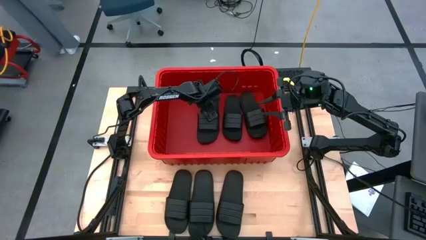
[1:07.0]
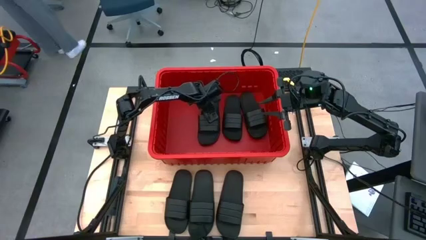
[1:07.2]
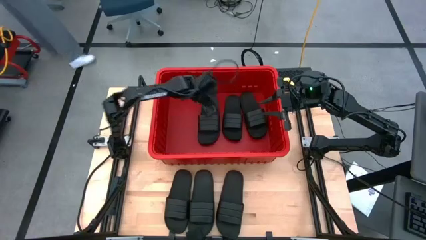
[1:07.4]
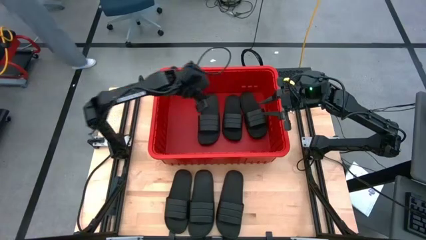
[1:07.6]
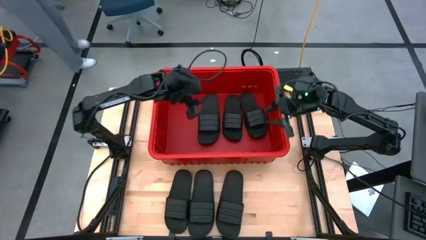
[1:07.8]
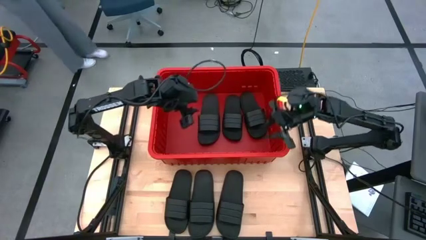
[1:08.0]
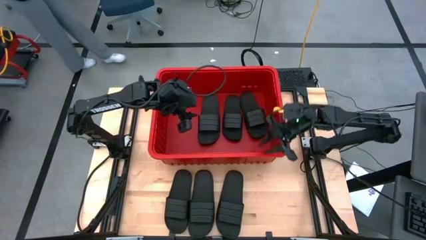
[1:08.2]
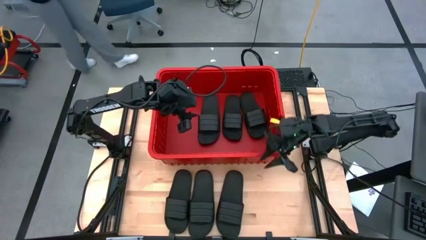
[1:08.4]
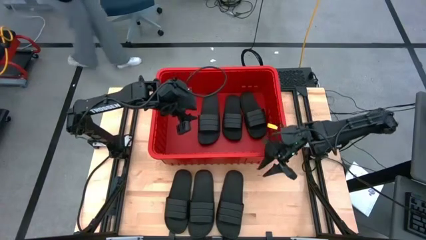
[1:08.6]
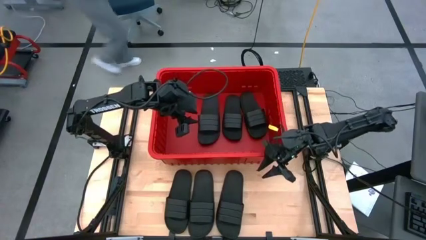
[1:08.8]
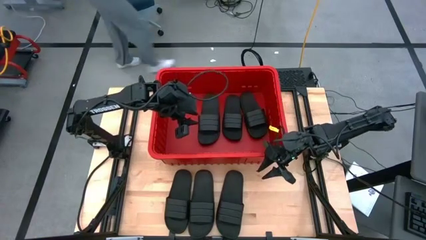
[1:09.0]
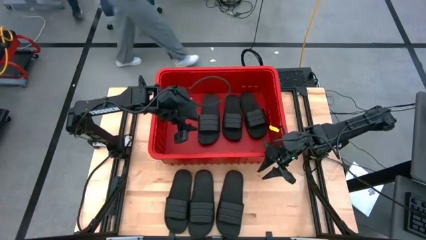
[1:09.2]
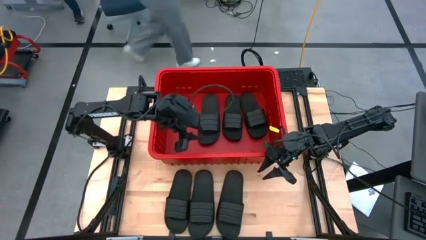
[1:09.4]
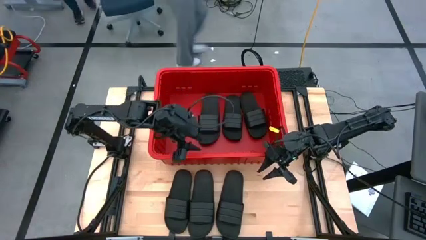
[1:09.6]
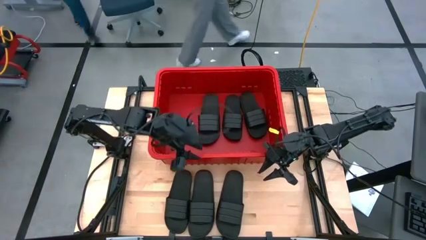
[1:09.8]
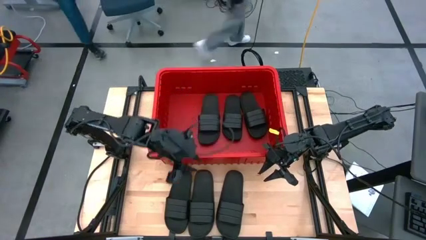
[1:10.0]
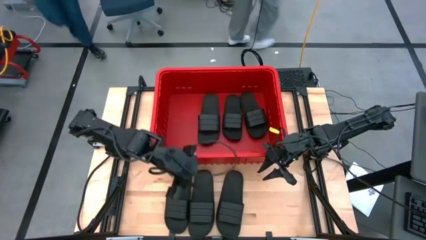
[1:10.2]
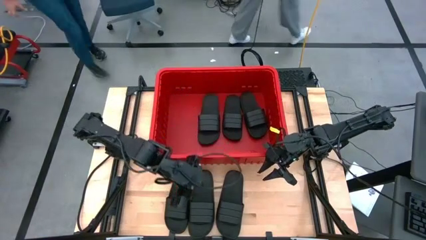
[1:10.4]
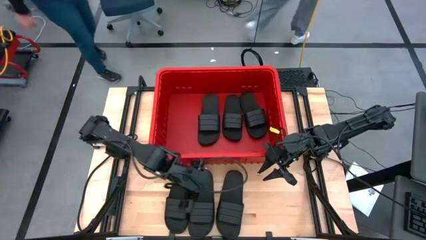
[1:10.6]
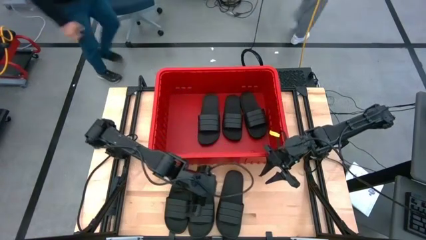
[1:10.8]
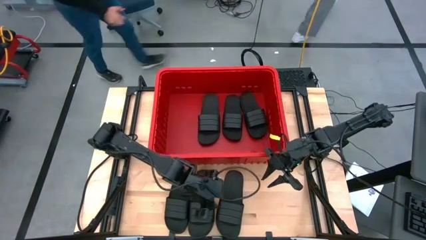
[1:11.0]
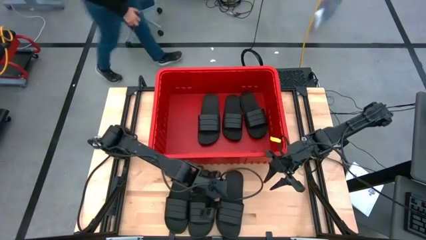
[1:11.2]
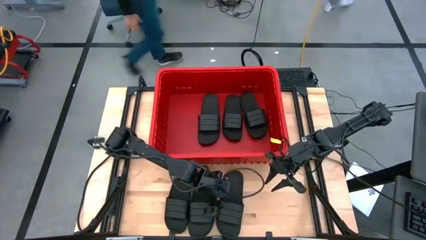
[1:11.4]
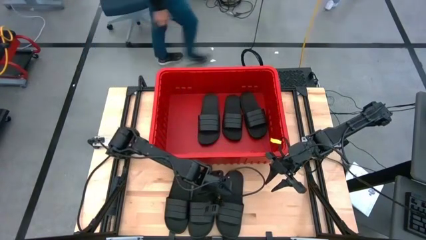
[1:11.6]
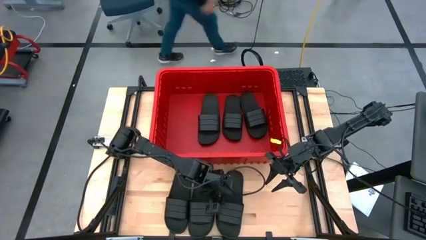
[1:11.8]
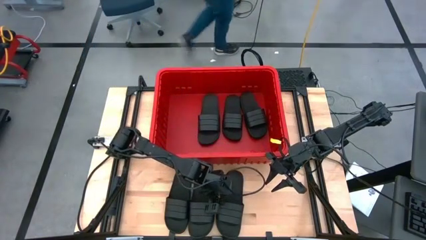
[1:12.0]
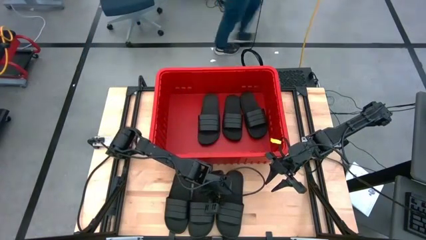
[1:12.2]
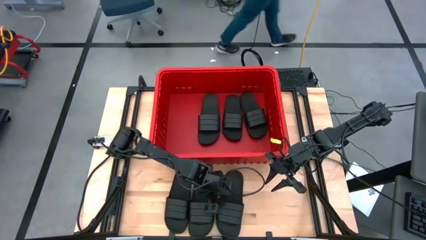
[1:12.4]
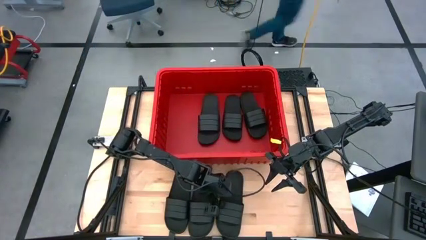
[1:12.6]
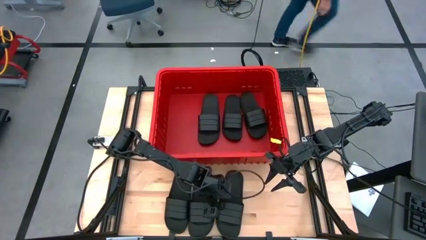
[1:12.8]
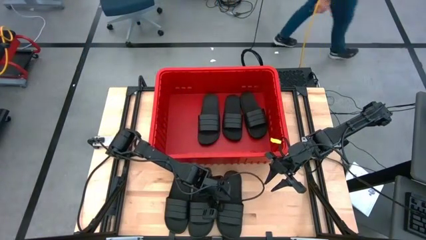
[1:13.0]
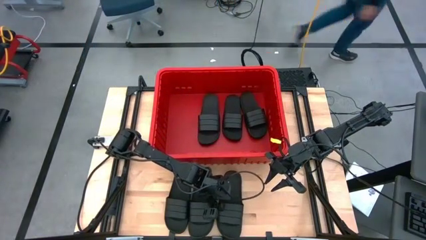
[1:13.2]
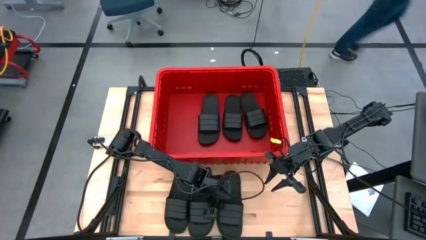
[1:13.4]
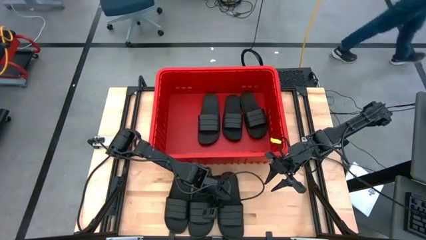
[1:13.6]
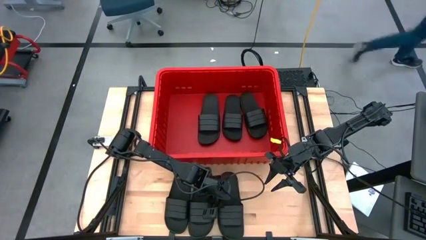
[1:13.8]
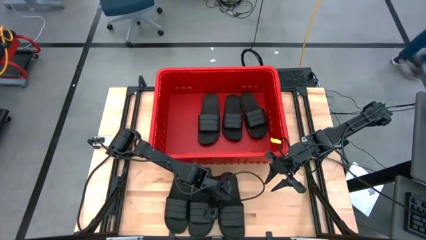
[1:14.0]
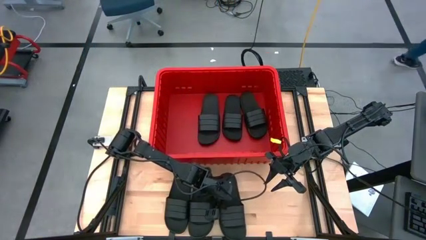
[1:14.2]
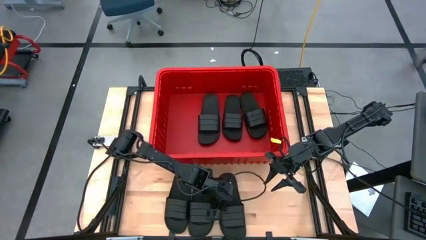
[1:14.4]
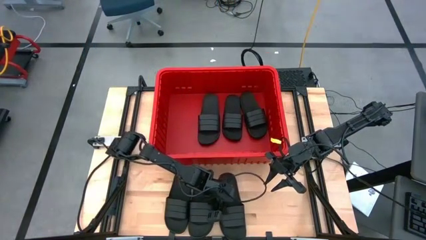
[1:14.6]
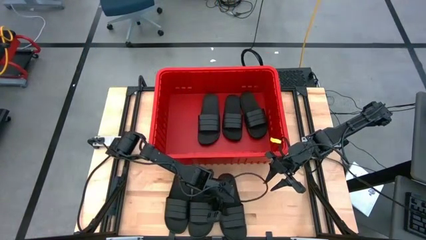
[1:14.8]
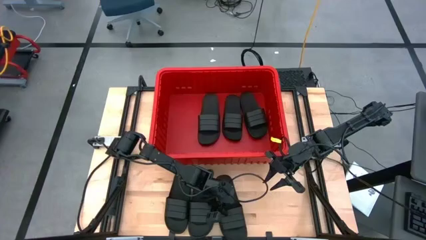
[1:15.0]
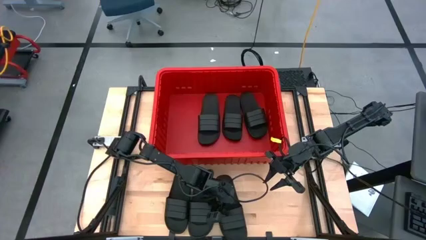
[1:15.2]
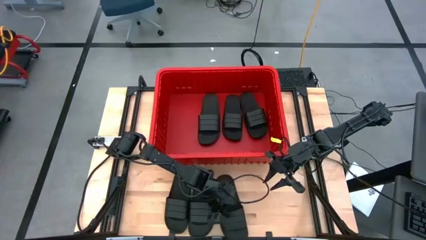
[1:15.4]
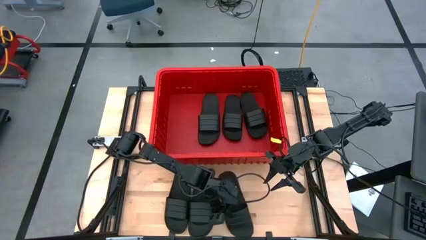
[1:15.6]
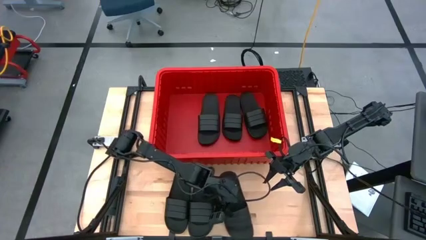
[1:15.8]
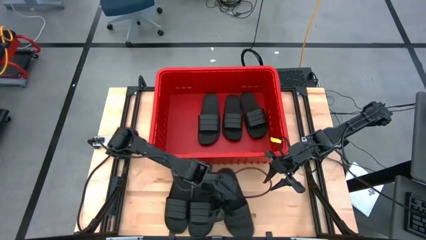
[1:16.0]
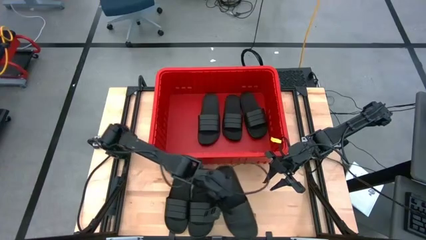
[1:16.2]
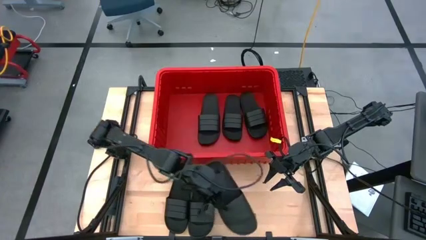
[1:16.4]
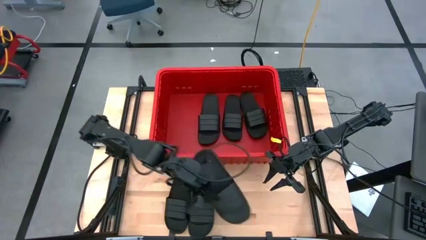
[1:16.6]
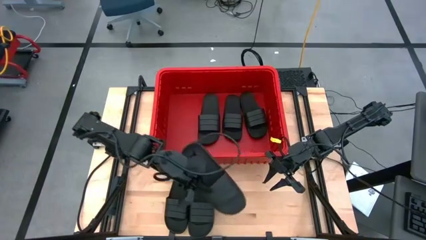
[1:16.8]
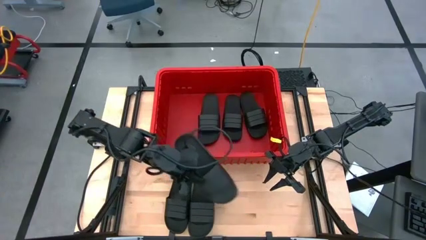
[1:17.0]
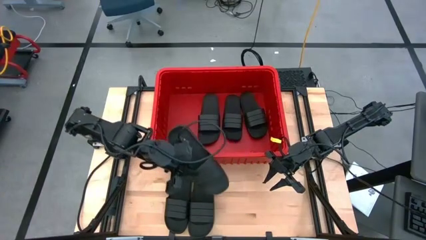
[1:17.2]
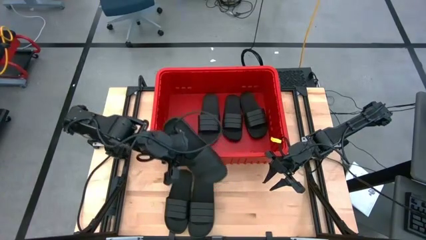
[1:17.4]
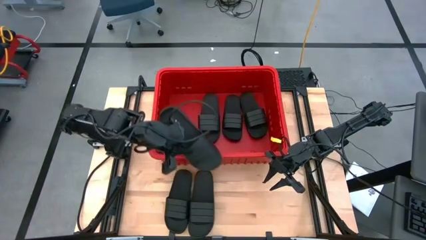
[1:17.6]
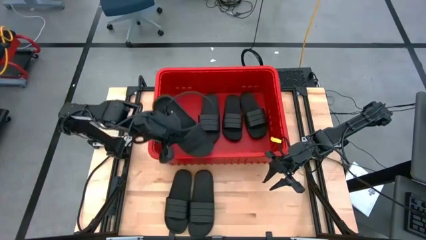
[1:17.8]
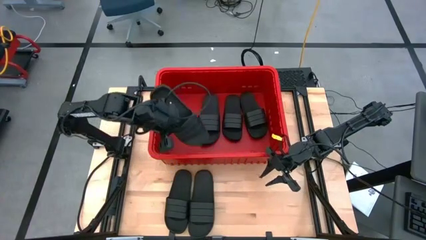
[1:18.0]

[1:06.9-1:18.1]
Task: Pick and place slides into bin
Put the black slide into the red bin
